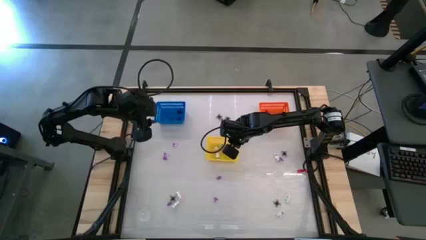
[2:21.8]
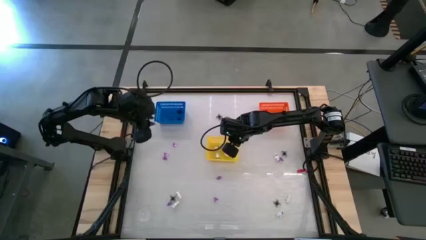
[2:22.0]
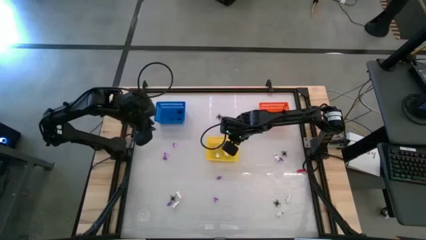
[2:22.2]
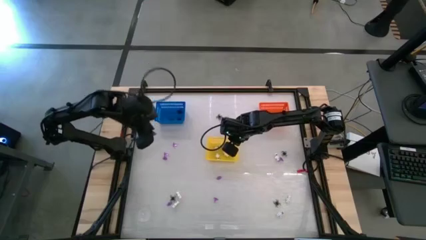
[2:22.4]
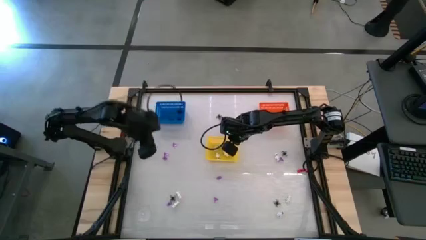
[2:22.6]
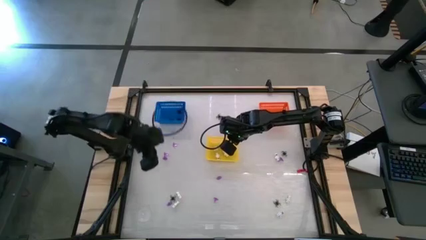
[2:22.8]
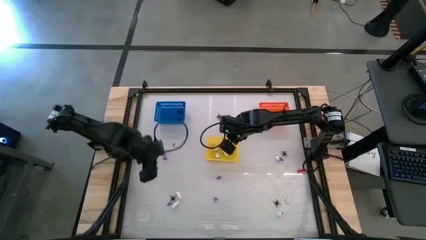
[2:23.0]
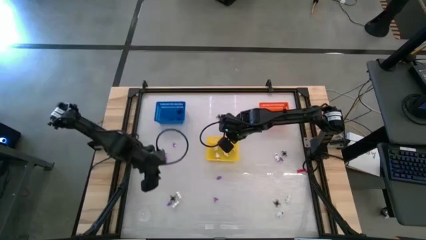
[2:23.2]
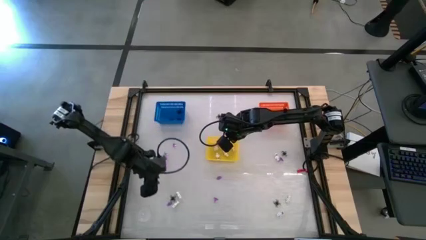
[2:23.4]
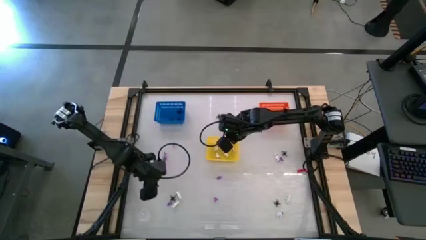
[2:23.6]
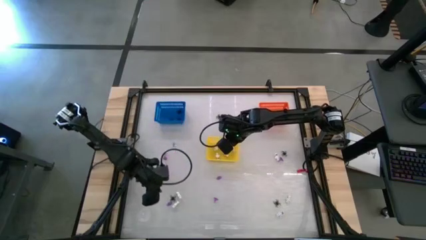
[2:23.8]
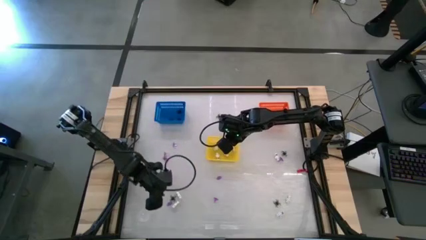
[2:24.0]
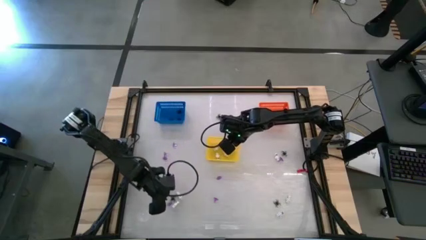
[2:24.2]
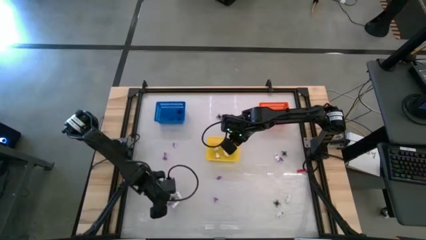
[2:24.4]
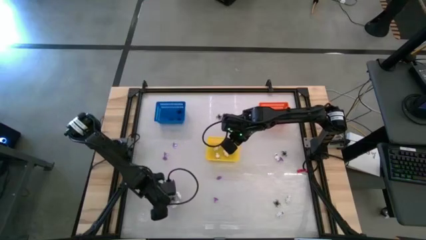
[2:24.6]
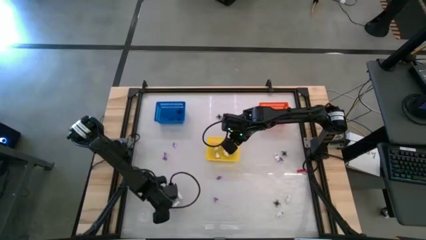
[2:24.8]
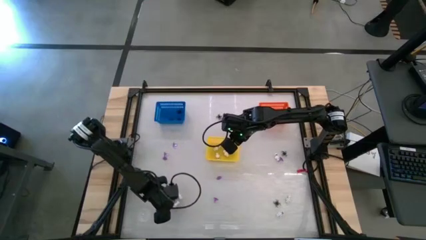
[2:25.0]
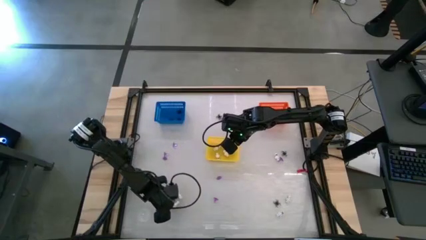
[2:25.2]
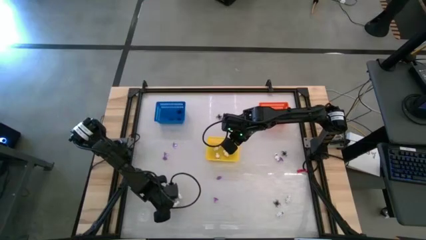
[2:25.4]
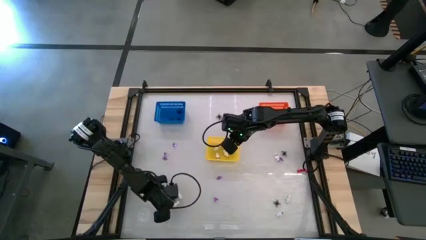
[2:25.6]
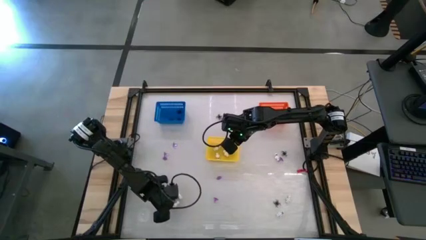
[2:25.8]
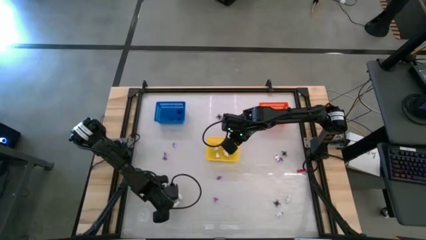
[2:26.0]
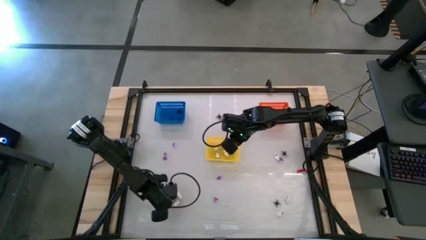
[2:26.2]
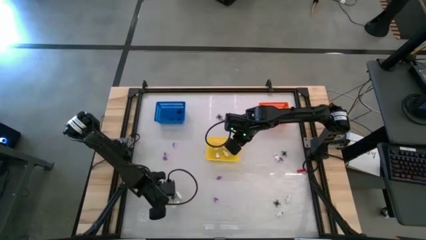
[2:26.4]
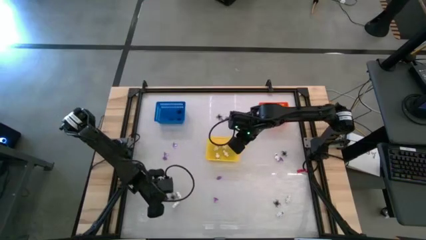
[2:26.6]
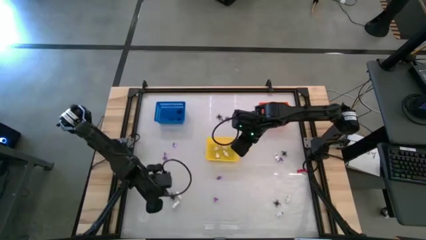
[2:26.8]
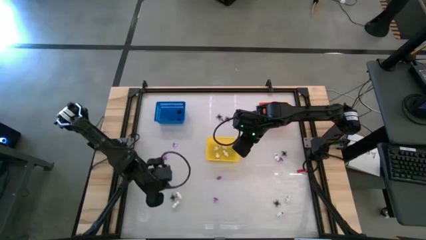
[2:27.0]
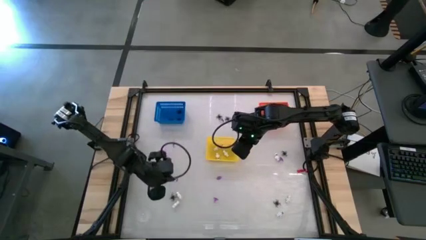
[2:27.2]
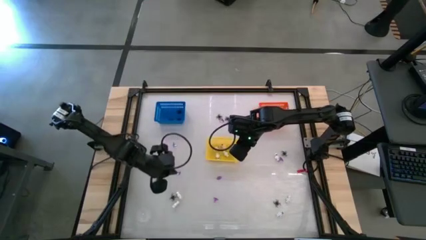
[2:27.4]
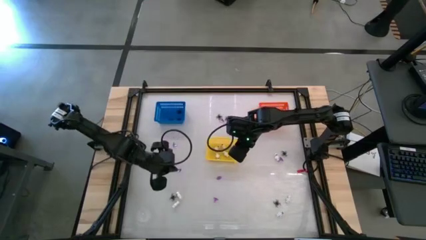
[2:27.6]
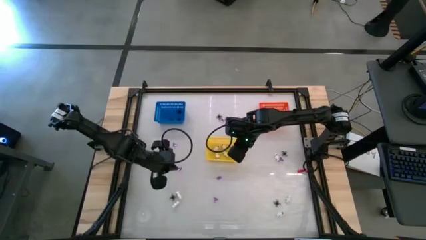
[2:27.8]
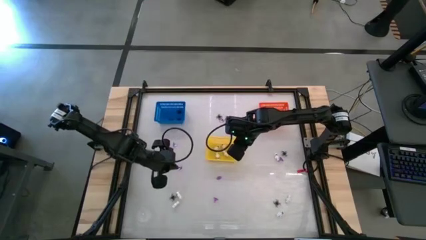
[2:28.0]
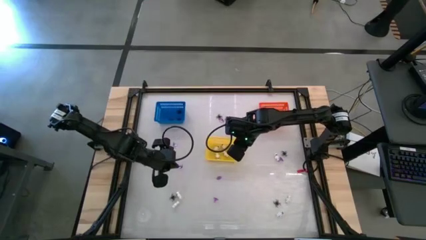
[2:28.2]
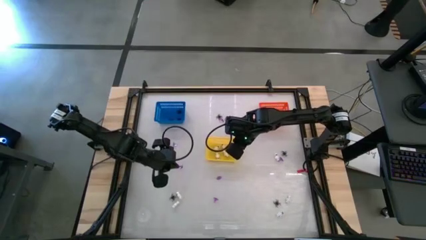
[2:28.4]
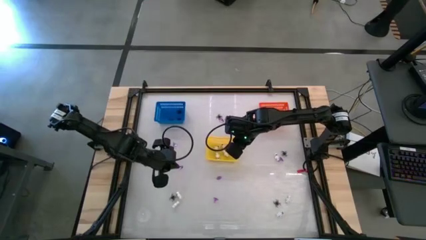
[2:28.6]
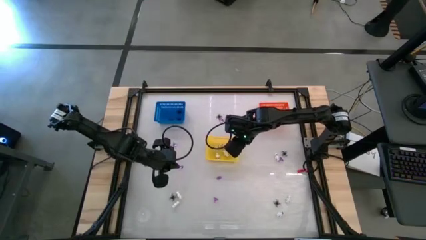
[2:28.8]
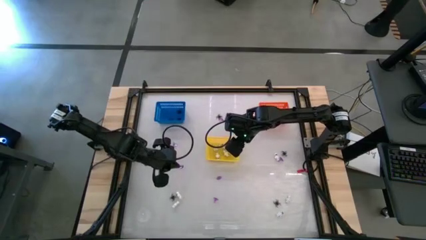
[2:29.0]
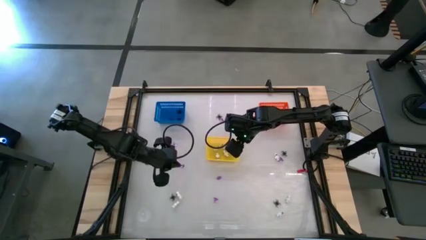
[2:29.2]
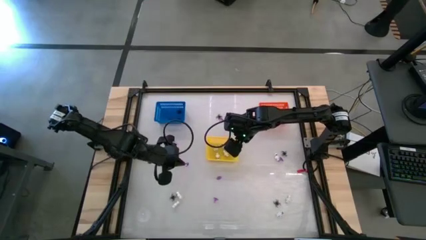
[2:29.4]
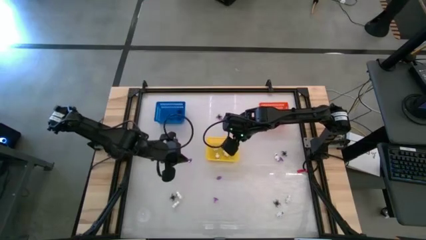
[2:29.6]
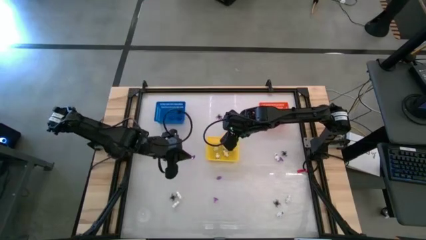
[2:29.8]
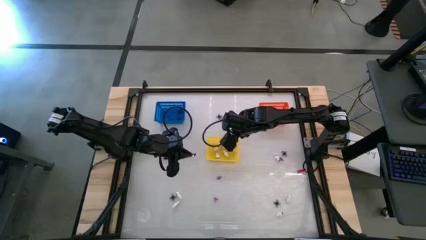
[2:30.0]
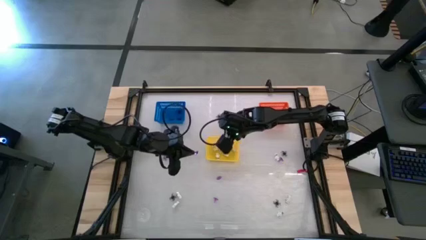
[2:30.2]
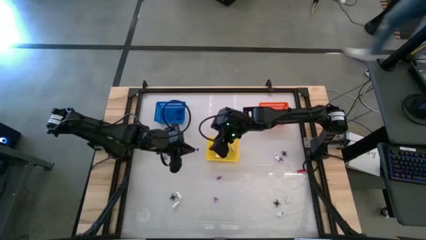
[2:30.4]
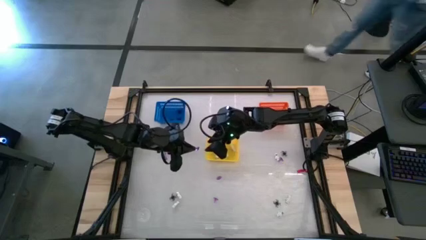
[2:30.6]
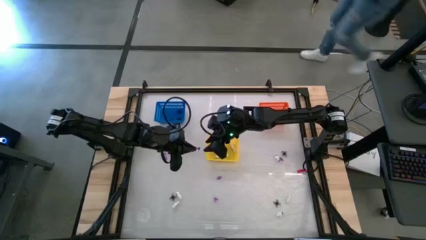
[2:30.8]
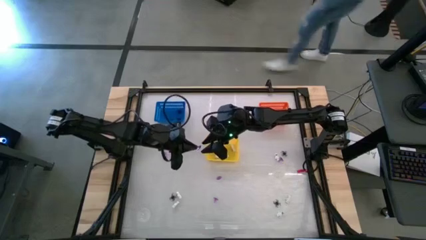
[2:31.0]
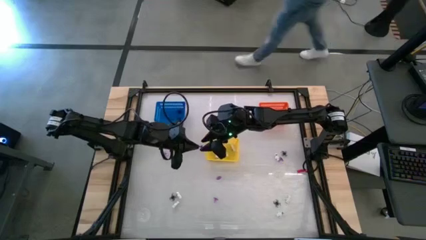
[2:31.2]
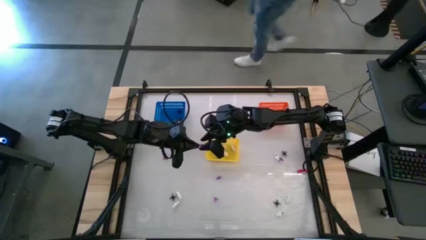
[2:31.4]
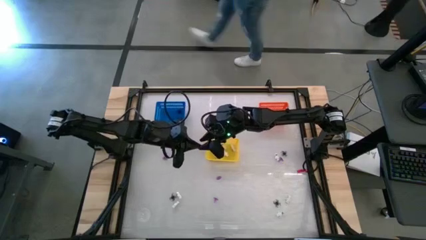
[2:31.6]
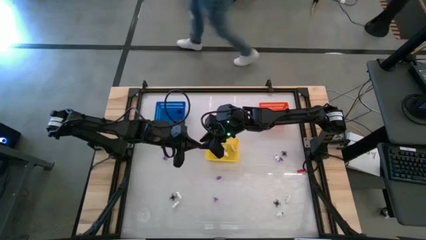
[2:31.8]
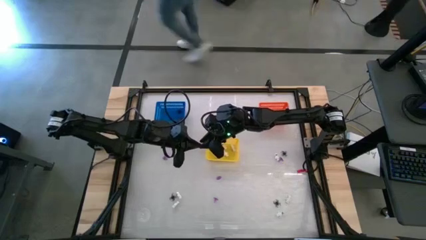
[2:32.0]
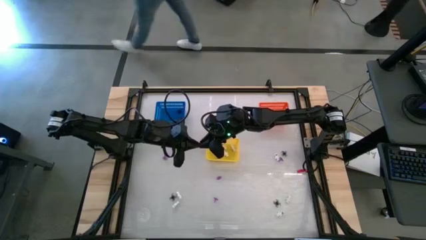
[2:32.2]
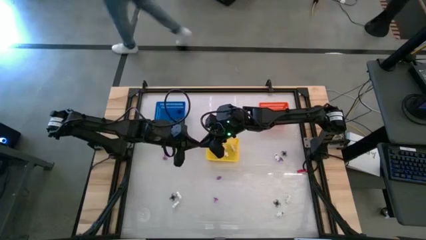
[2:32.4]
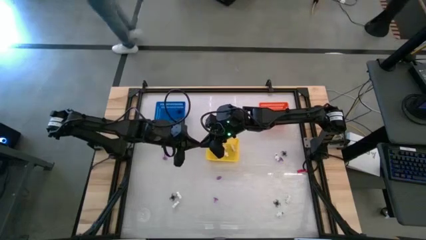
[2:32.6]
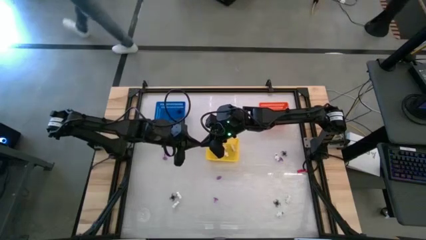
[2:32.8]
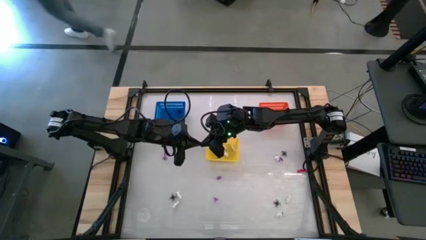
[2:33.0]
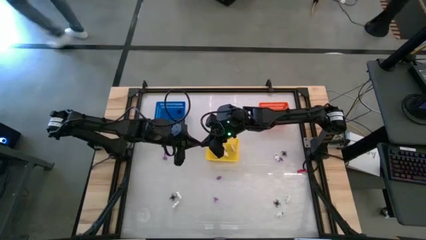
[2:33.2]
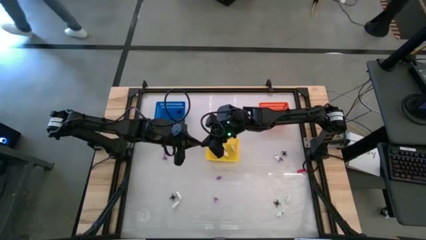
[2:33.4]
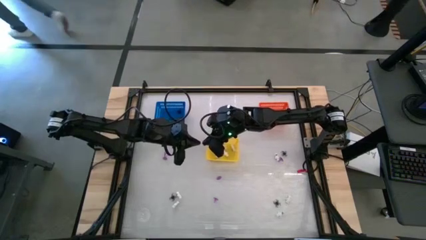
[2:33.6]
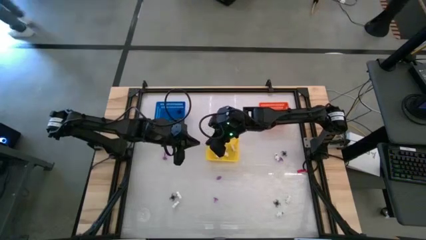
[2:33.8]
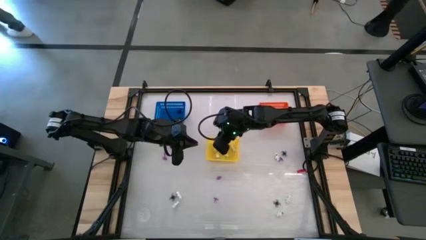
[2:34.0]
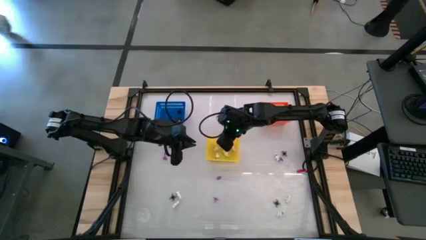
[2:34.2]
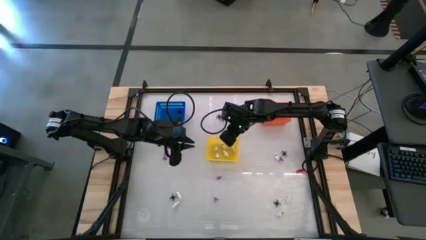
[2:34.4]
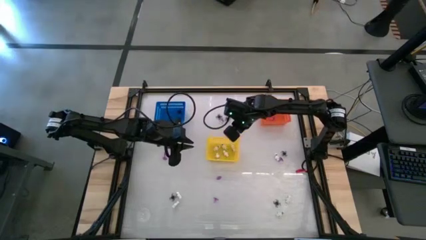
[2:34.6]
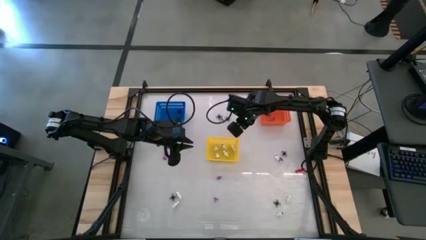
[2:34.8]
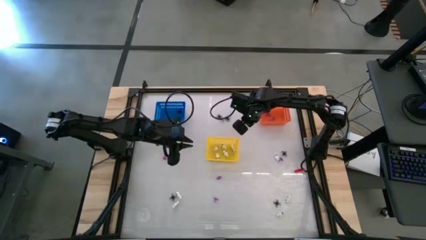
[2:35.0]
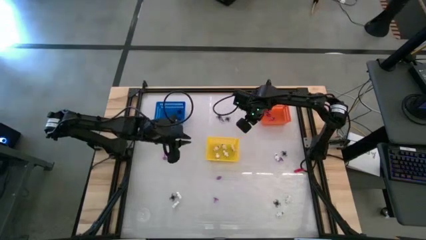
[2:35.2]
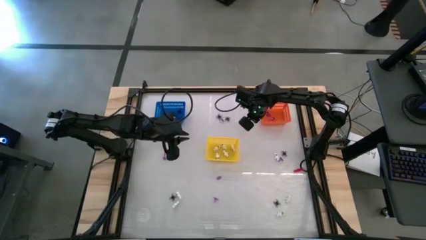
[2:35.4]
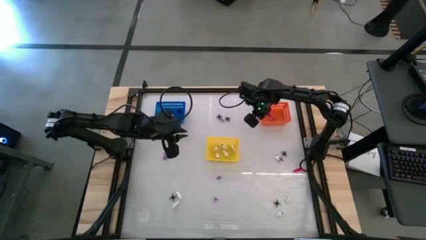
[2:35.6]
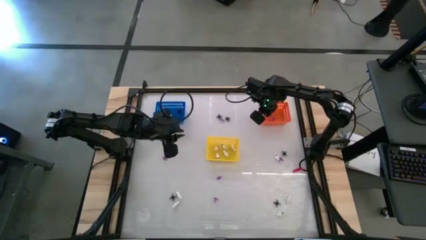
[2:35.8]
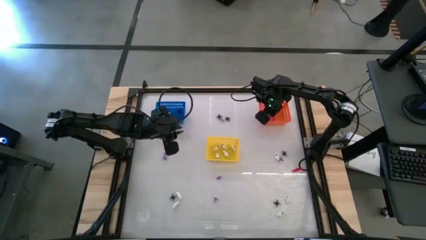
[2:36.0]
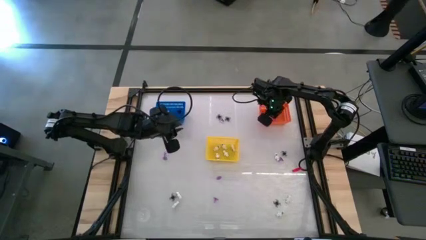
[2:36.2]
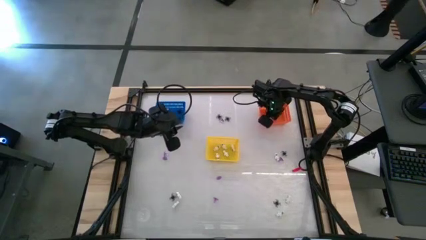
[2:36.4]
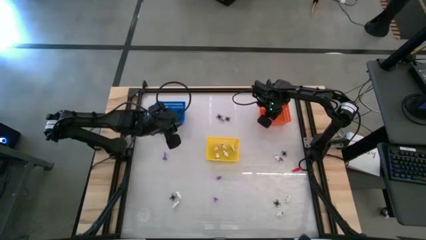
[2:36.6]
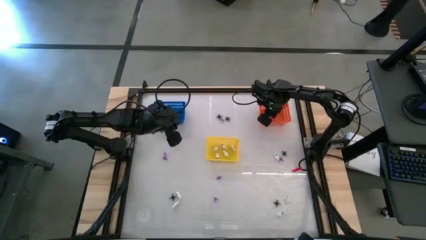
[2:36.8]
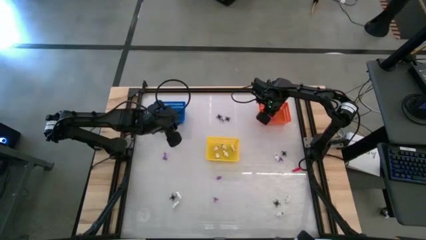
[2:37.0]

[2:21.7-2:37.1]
Task: Sort Halloween decoration
Put the purple witch hat toy into the orange bin
